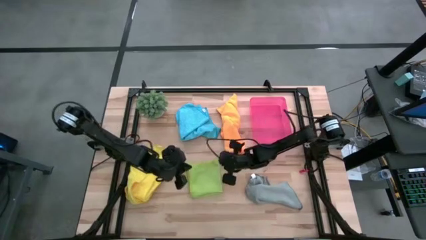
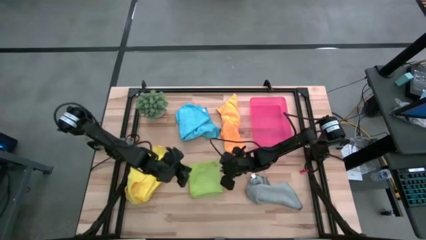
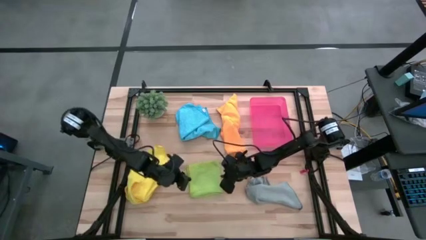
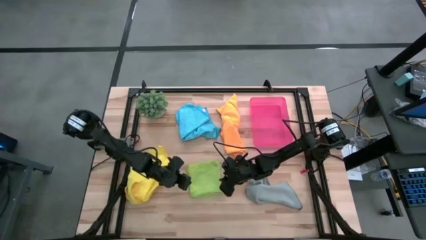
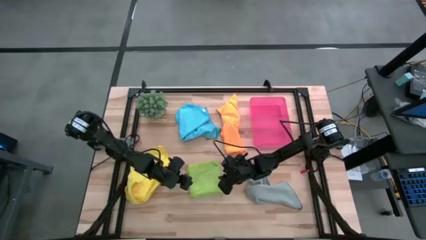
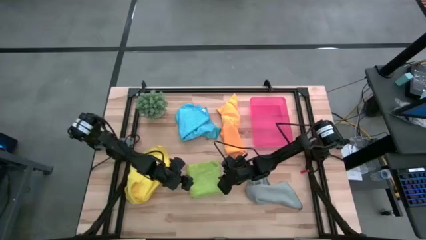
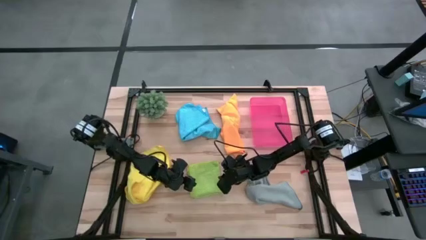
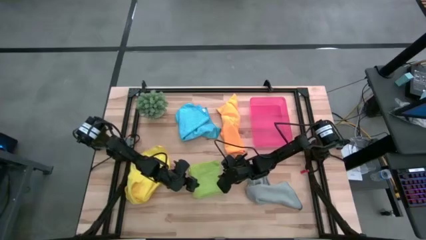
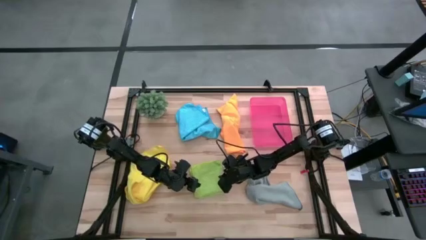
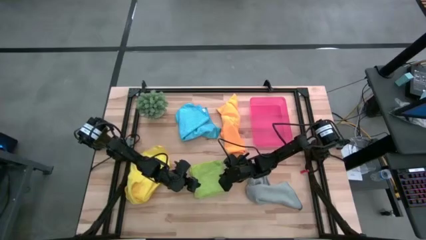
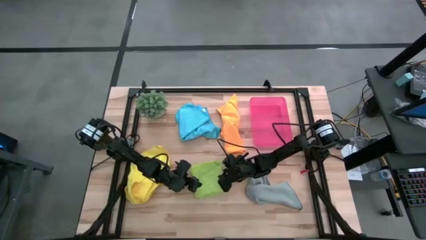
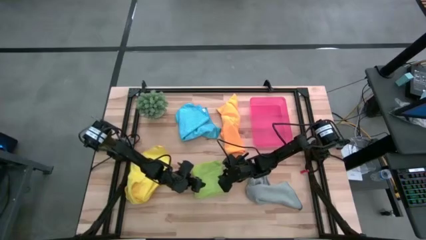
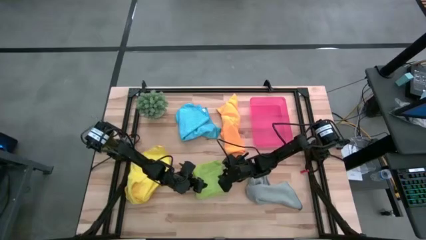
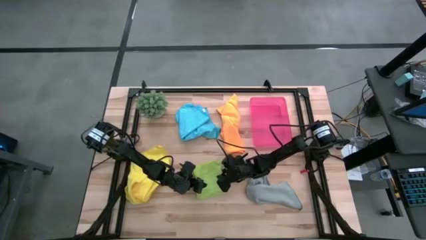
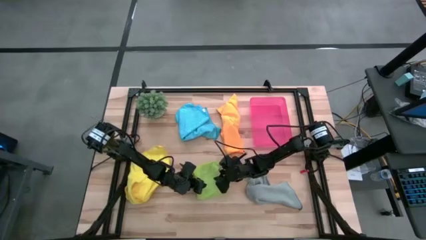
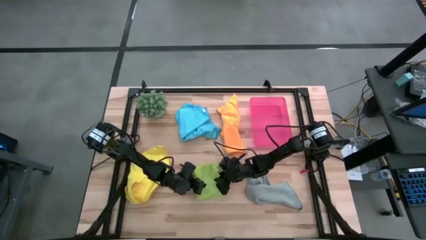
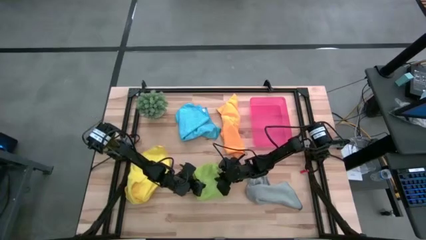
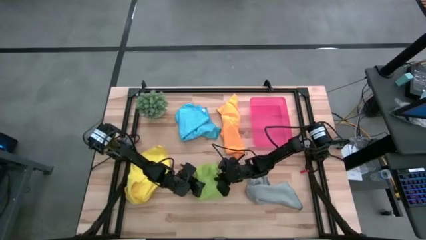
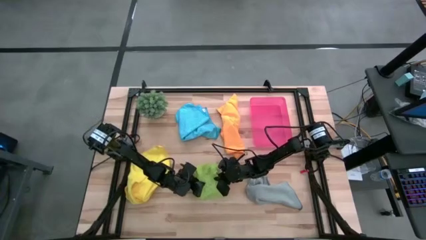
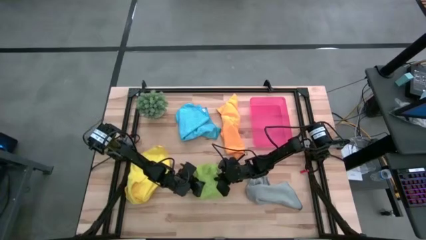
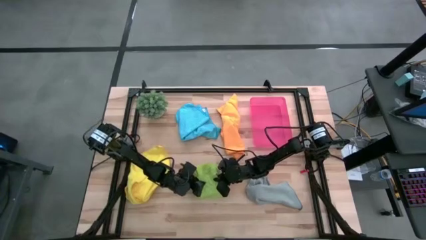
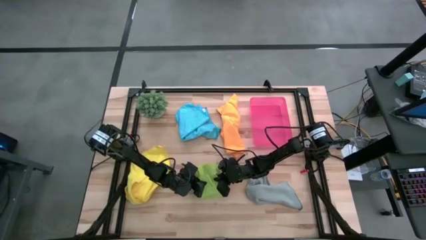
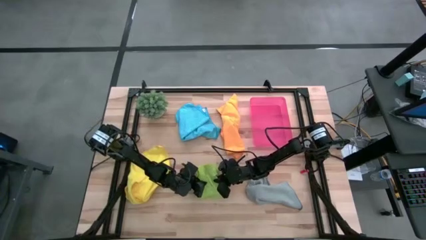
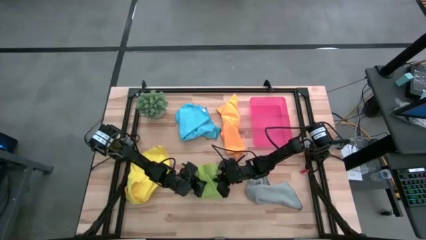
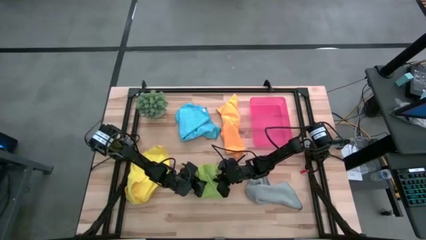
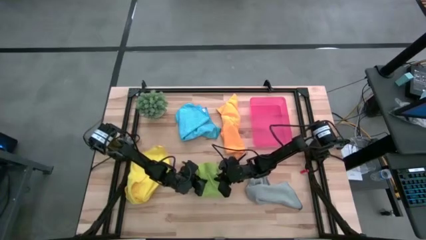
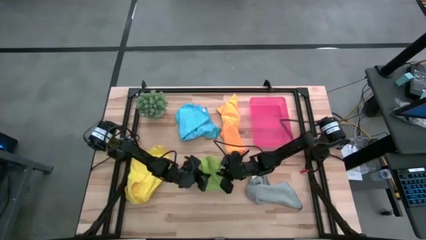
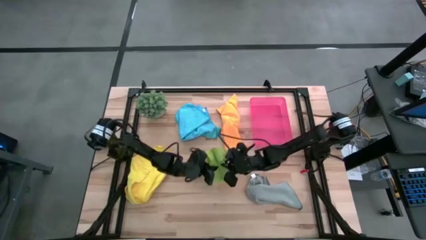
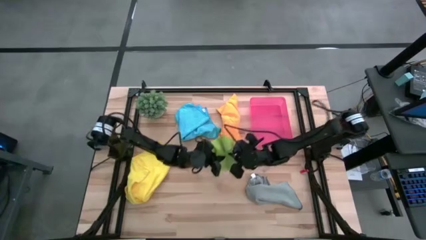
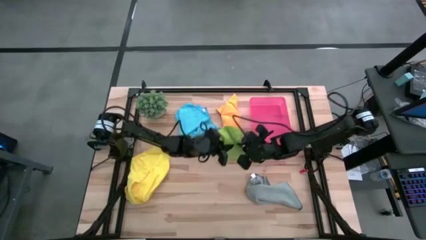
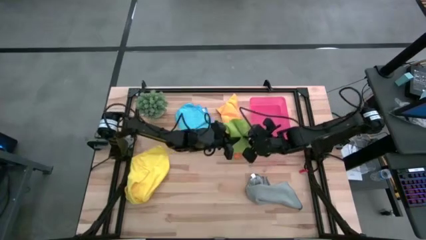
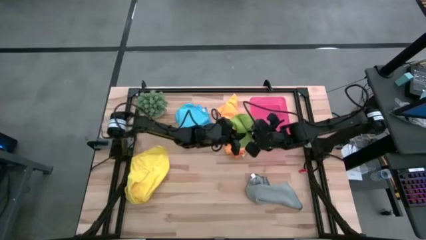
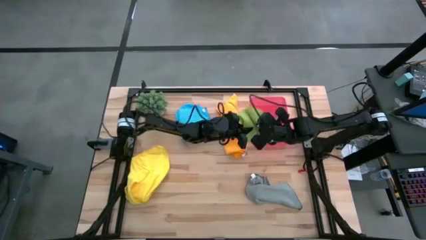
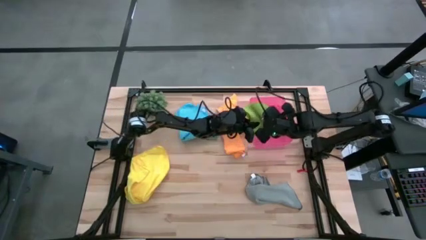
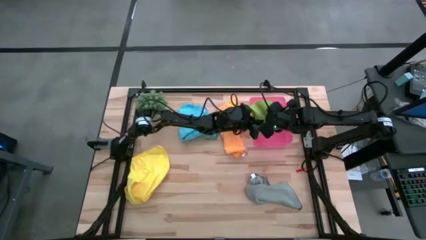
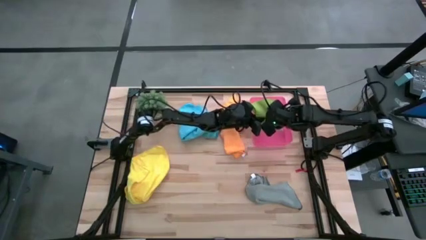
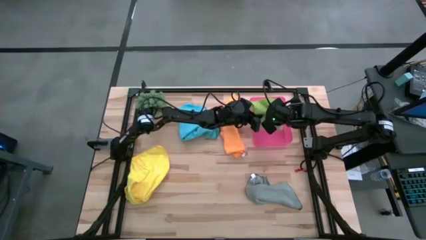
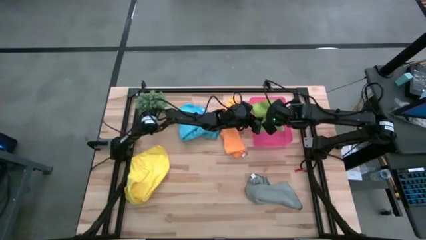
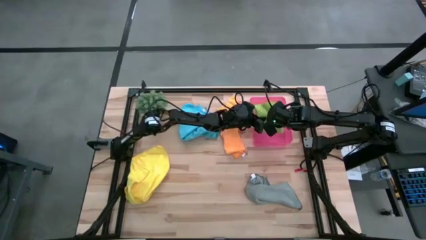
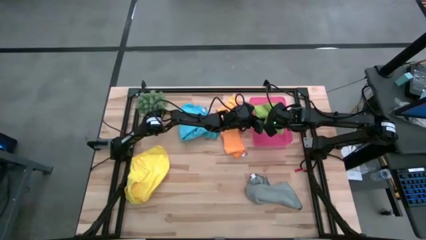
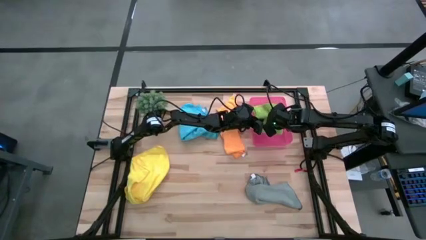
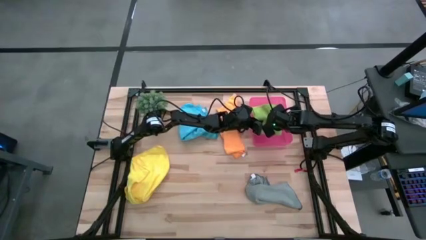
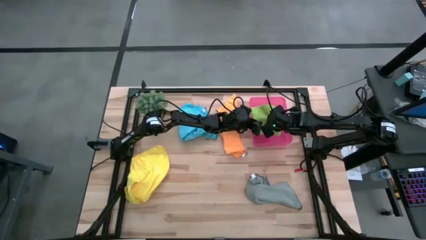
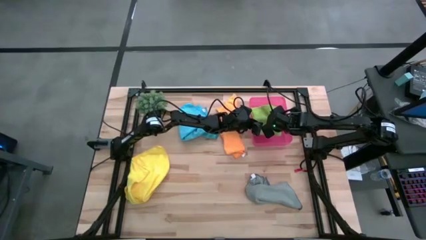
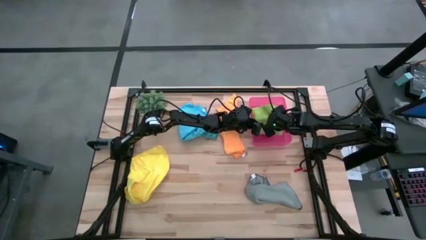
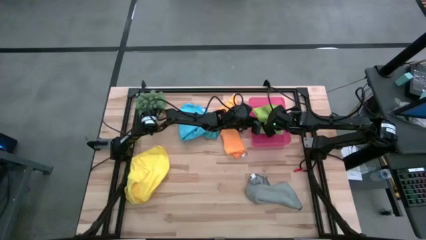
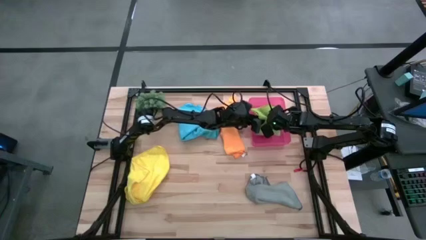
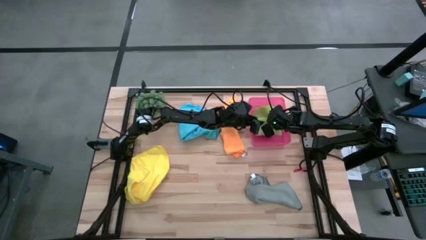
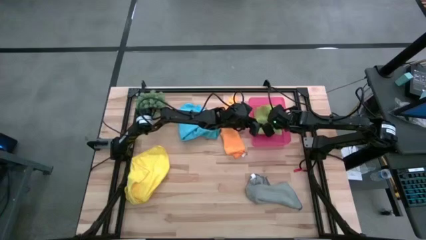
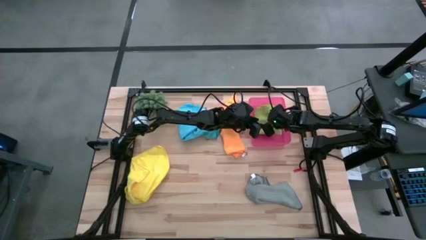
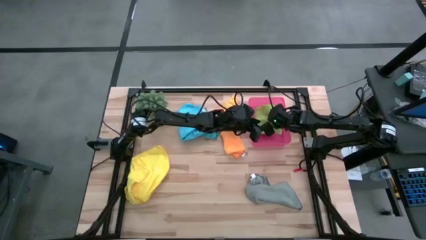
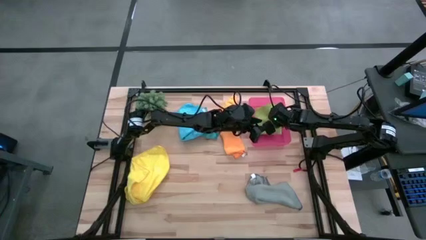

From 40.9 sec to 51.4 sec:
Task: Fold microfiber towels
Put the green microfiber cloth into the pink bin
